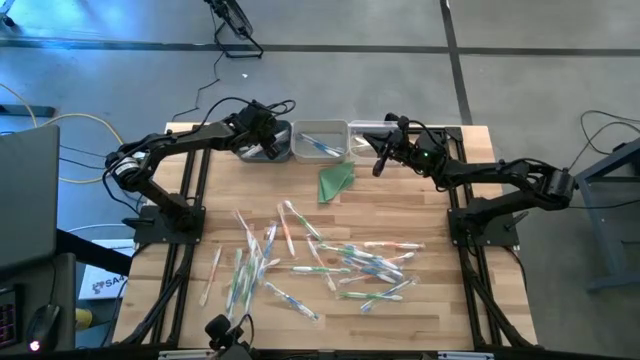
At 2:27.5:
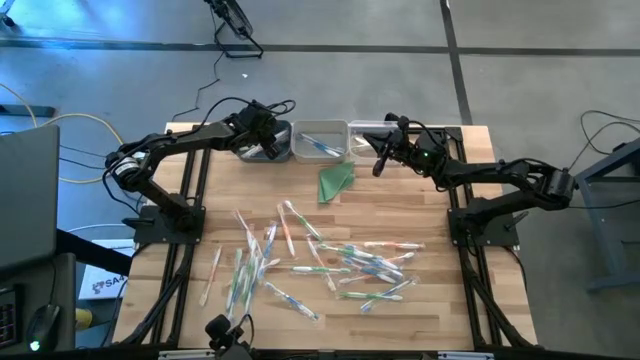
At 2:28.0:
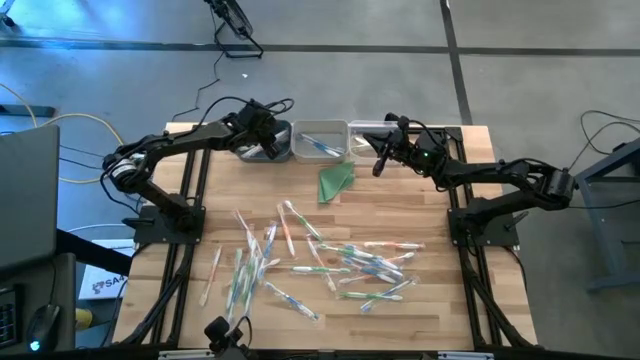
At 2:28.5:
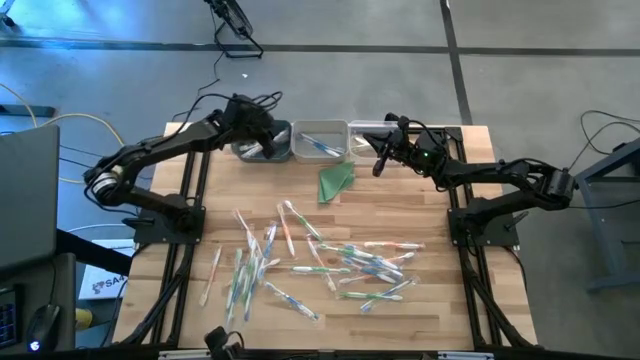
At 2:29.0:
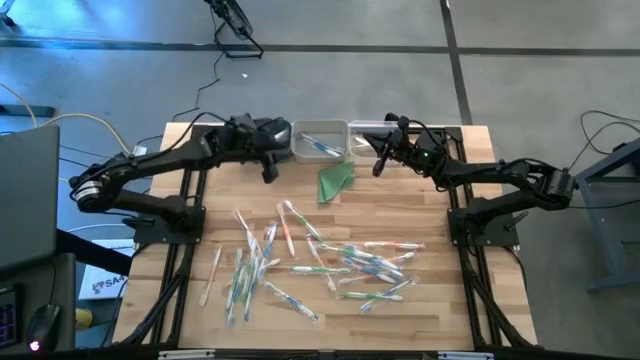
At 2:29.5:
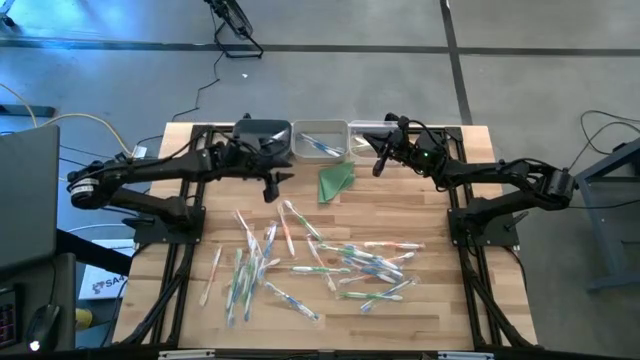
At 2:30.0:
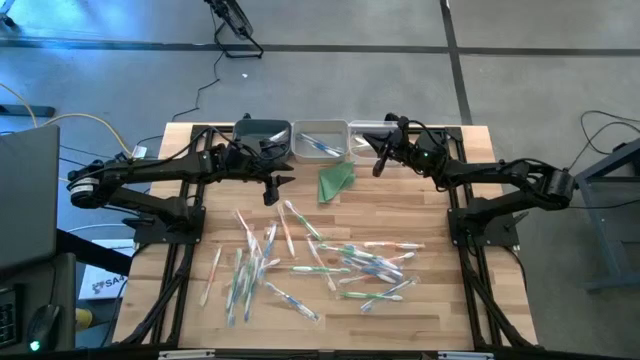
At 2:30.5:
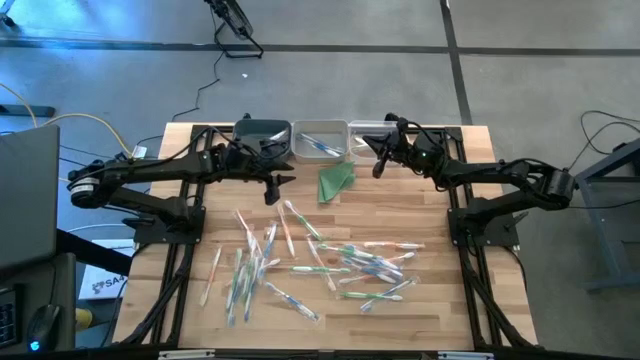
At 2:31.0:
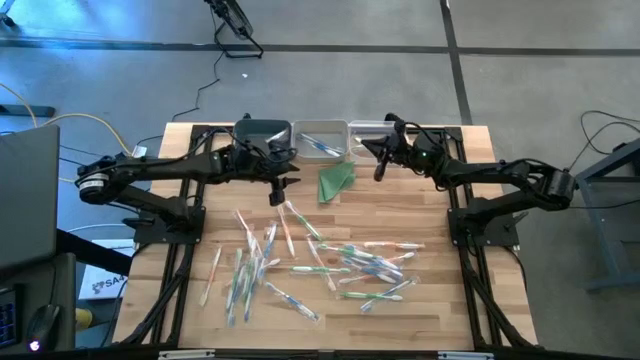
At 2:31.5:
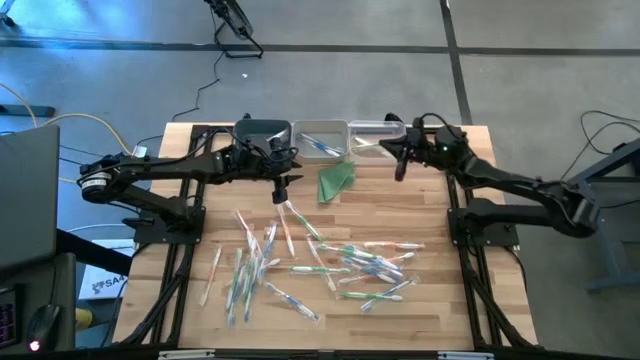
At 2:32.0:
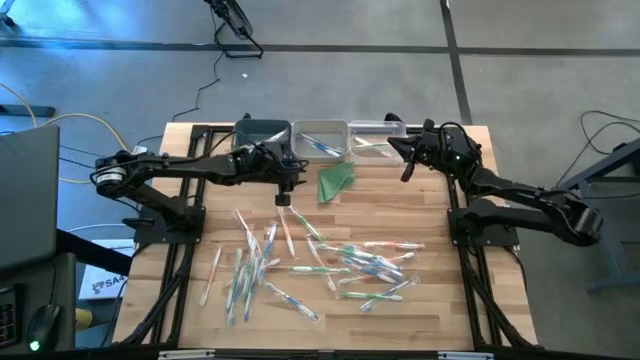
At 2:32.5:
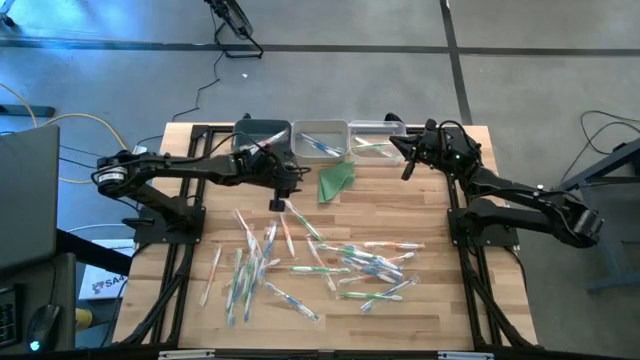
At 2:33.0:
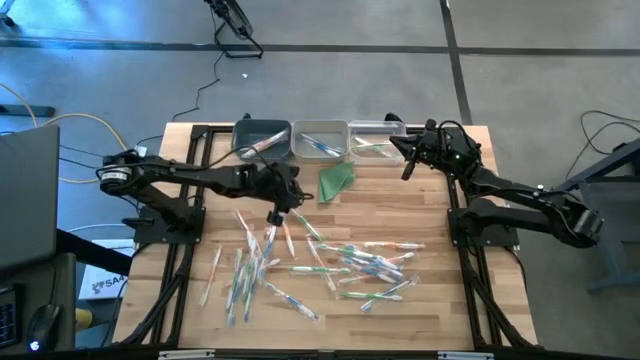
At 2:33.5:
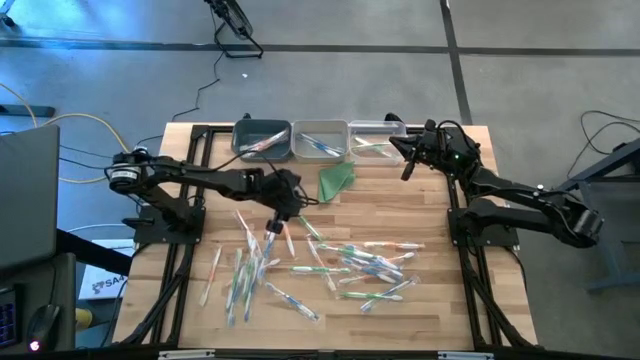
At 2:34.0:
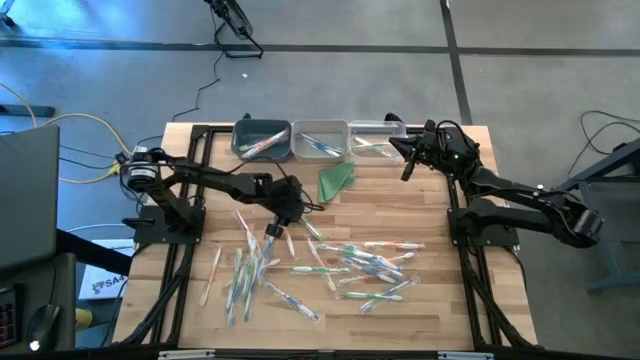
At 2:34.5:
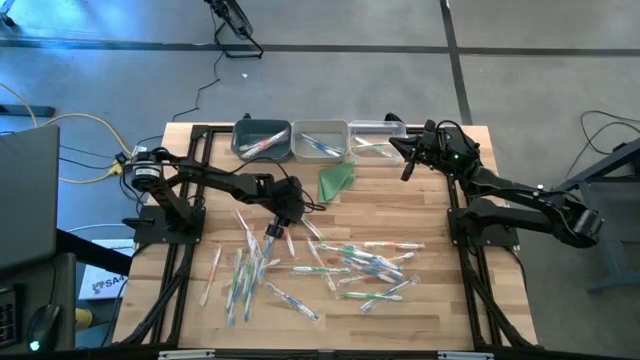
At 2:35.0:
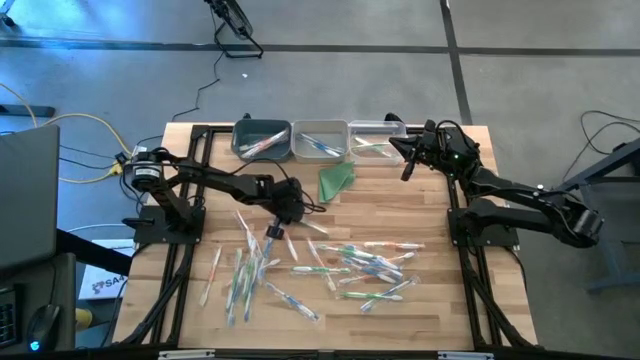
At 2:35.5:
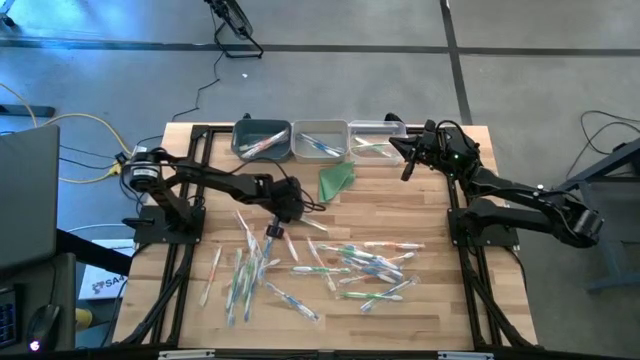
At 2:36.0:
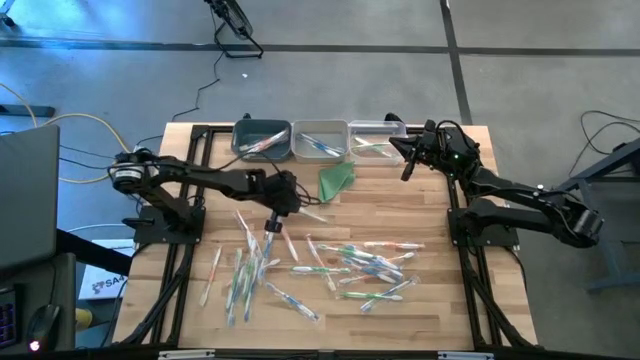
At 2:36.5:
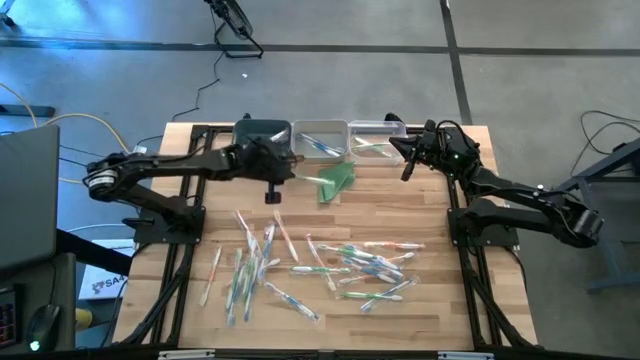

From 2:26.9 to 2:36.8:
Task: Pick & Place Toothbrushes
Put the green toothbrush into the transparent bin

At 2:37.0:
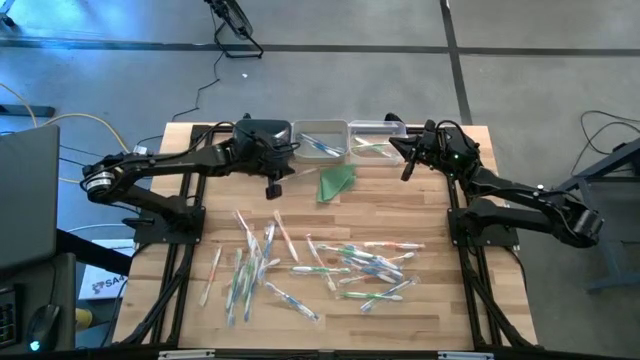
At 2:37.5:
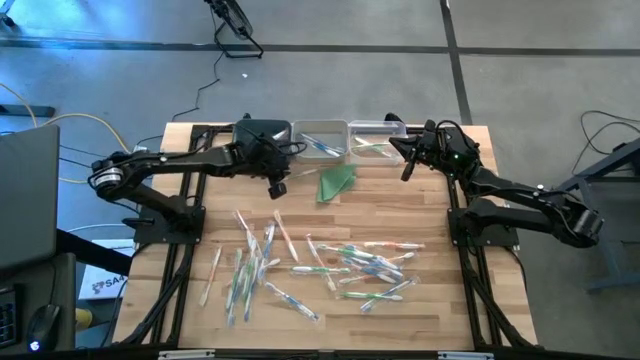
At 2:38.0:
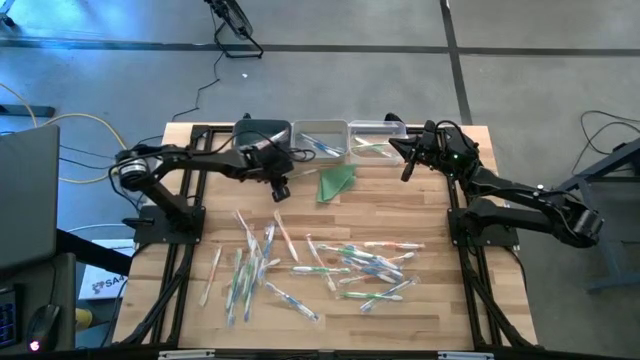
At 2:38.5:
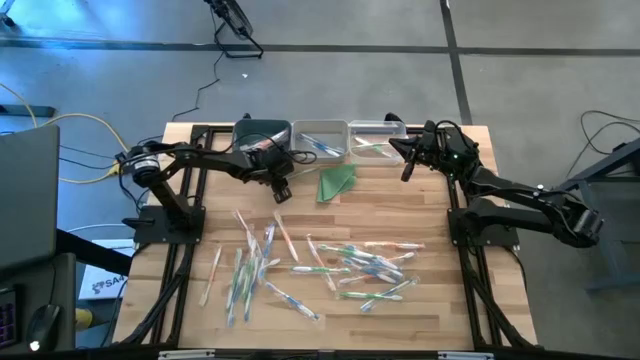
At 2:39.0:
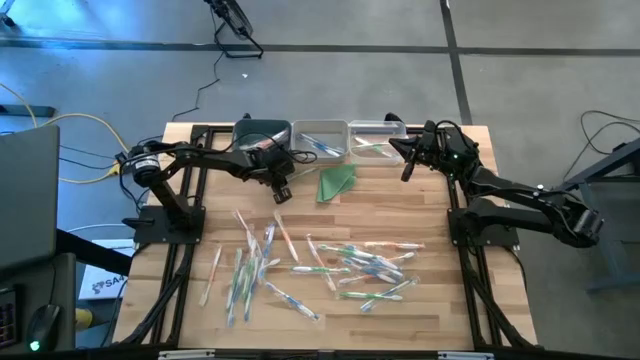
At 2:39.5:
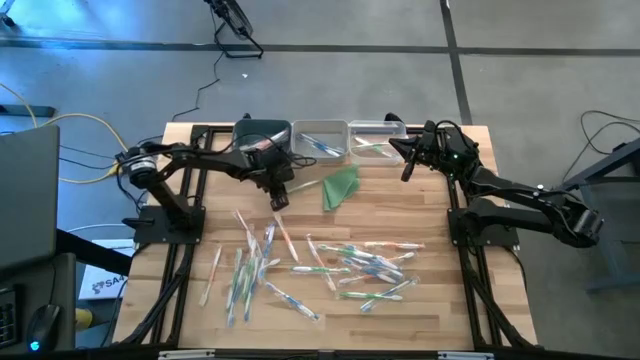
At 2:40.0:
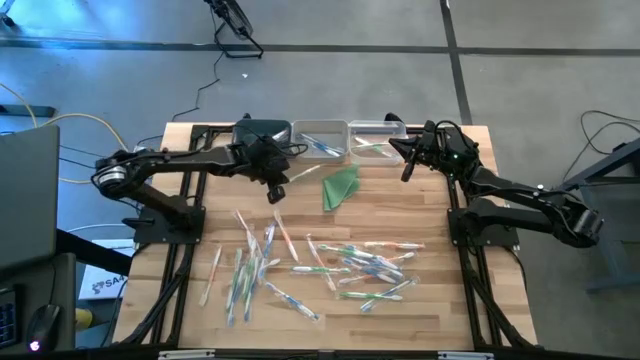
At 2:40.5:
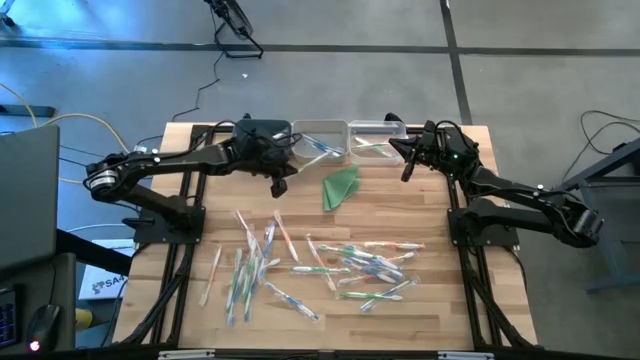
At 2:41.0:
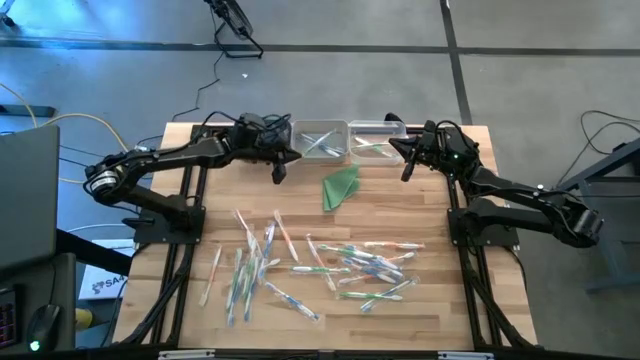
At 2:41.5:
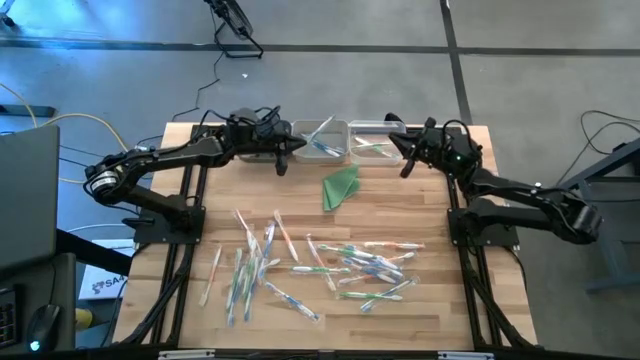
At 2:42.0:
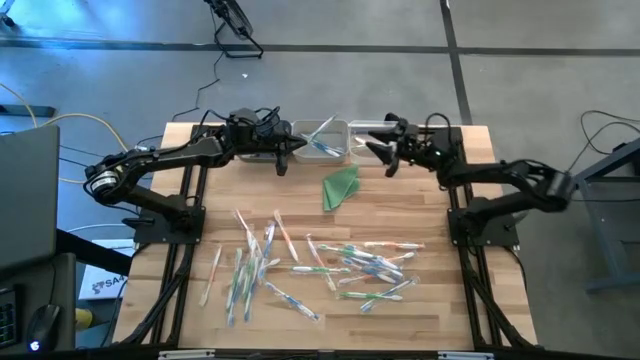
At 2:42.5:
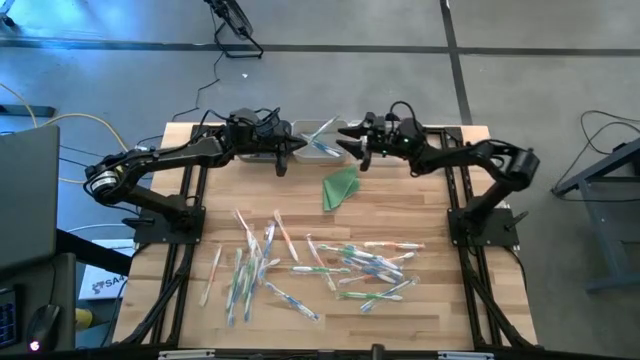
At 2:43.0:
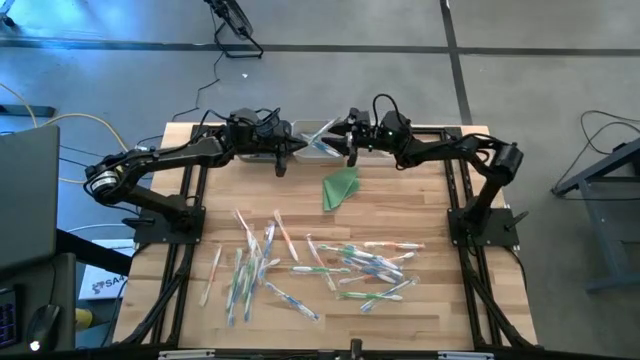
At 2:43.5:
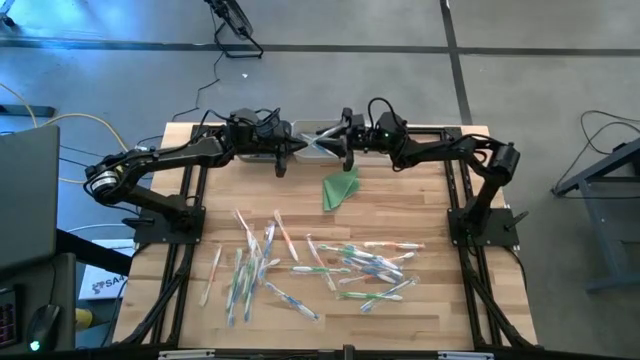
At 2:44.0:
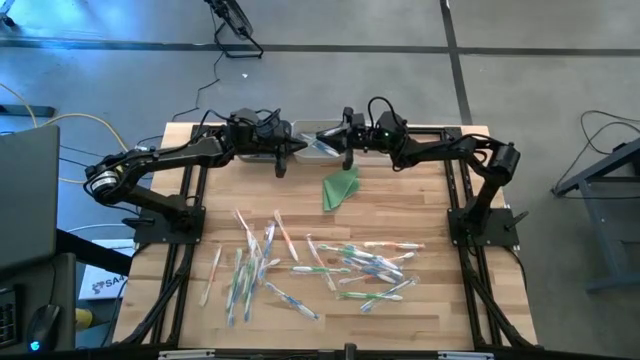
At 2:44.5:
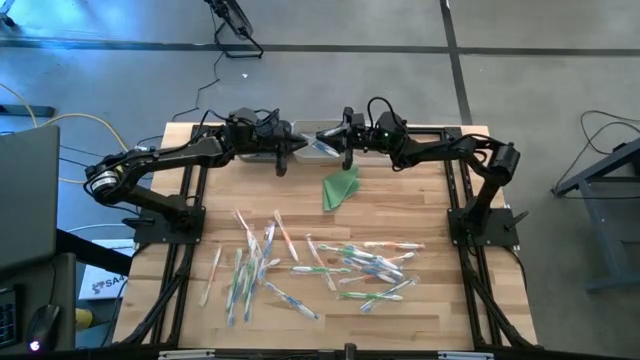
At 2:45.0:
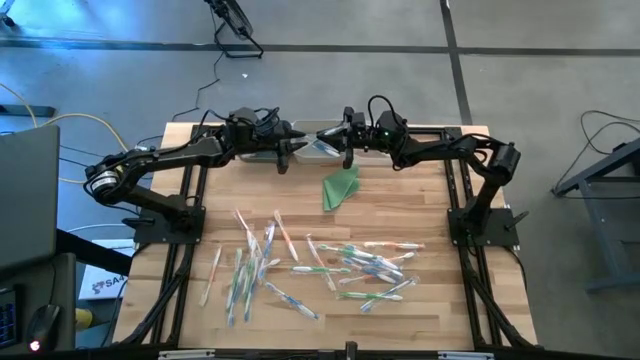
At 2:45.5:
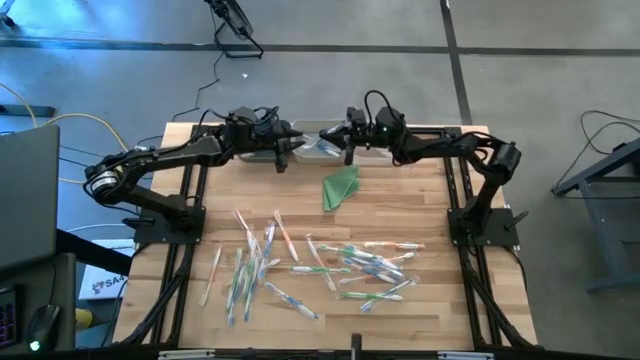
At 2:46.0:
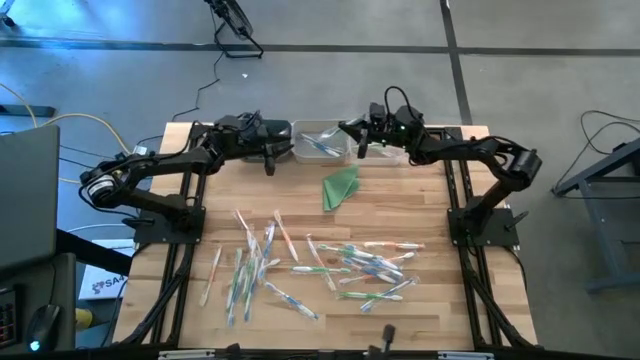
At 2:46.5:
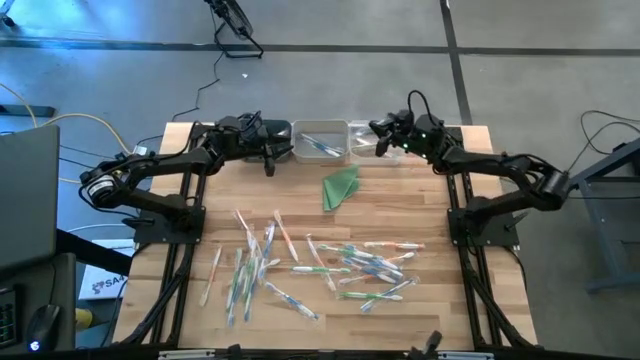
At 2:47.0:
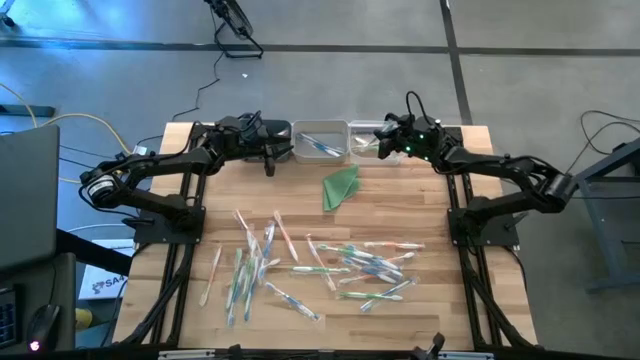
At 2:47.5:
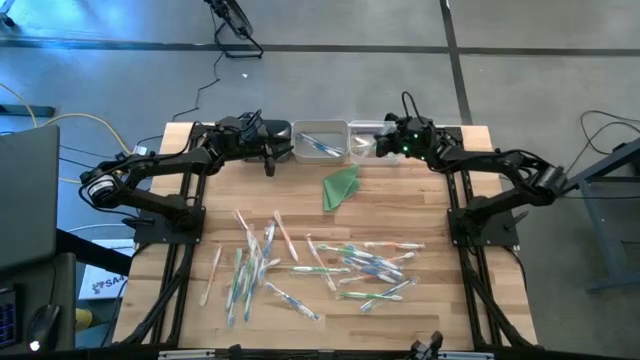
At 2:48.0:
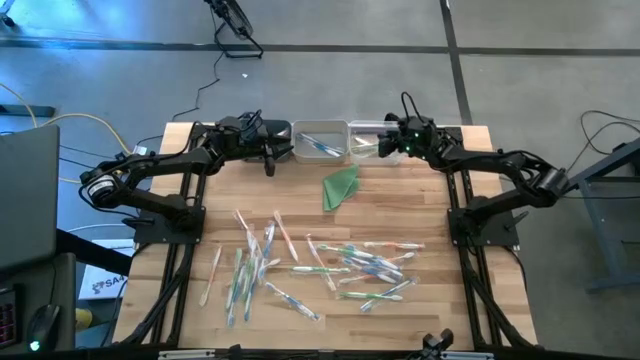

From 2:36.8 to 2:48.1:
Put the green toothbrush into the transparent bin
